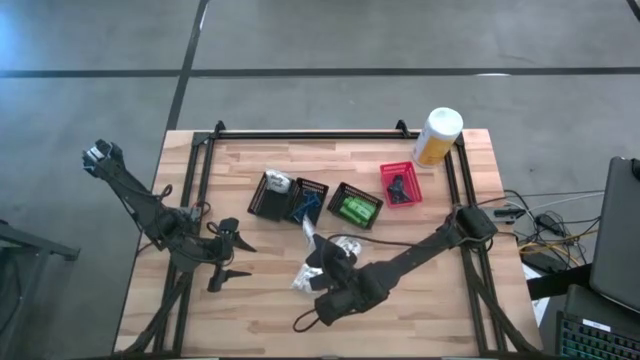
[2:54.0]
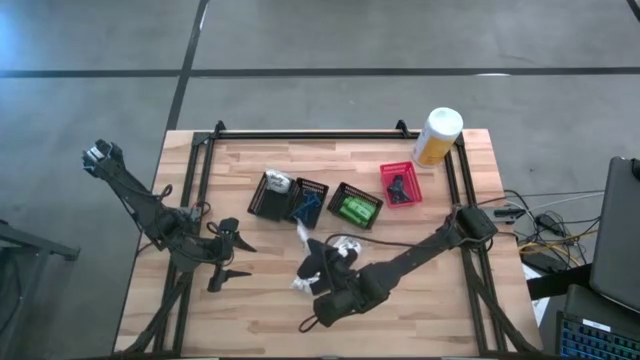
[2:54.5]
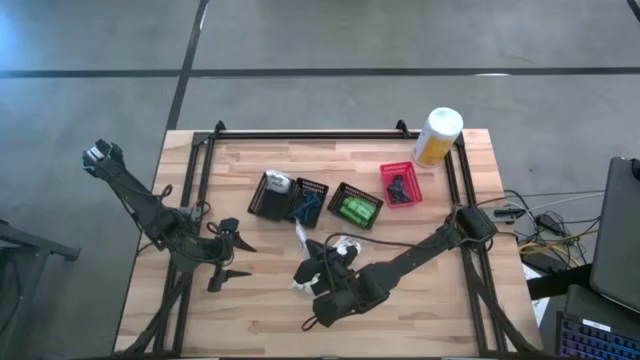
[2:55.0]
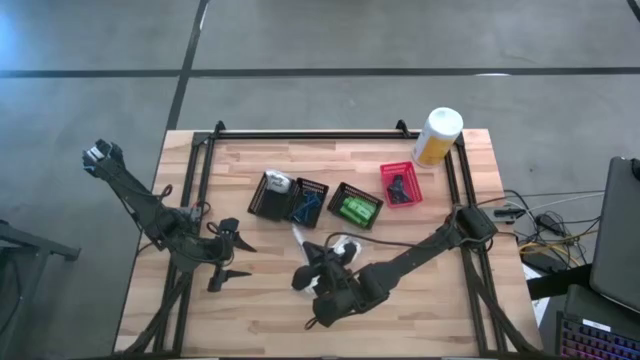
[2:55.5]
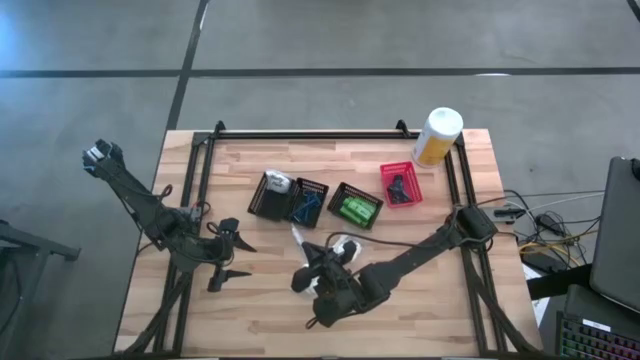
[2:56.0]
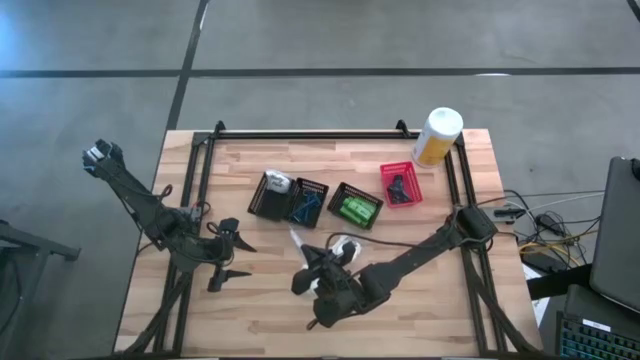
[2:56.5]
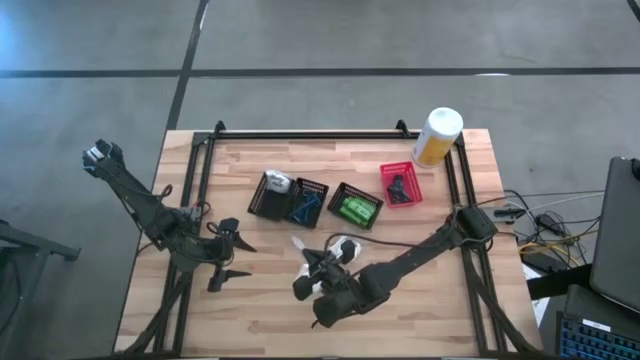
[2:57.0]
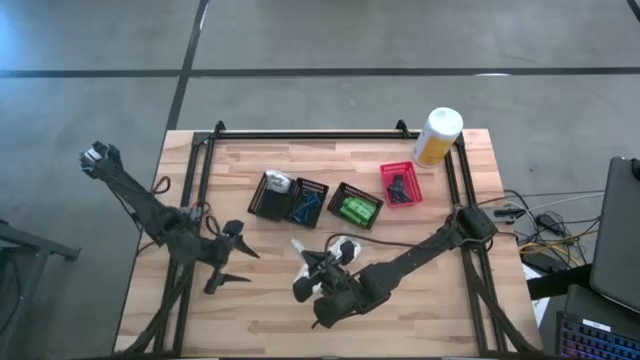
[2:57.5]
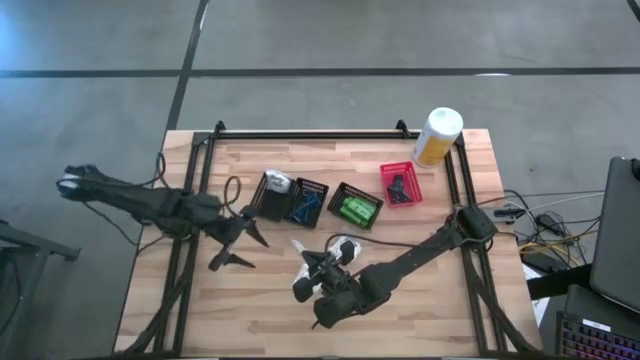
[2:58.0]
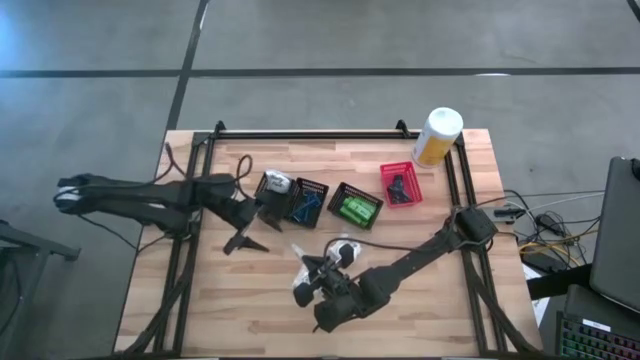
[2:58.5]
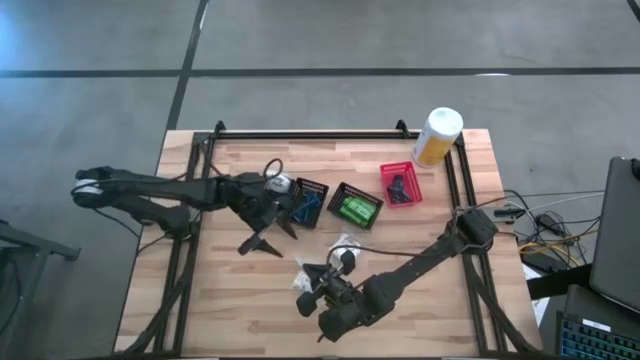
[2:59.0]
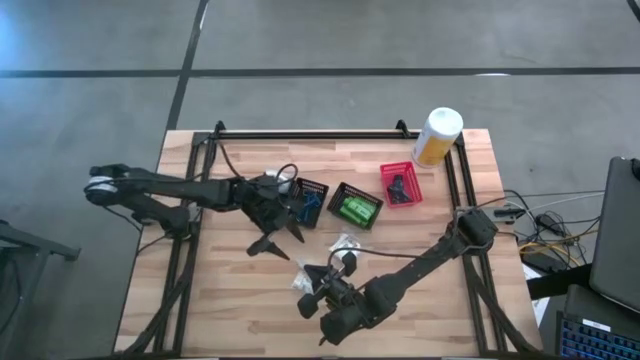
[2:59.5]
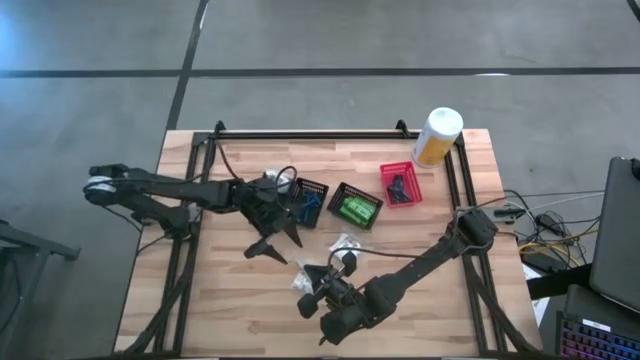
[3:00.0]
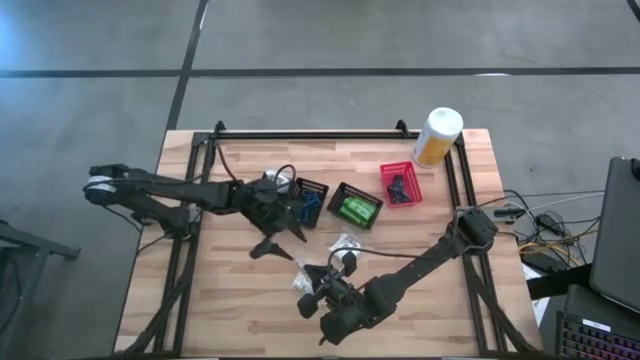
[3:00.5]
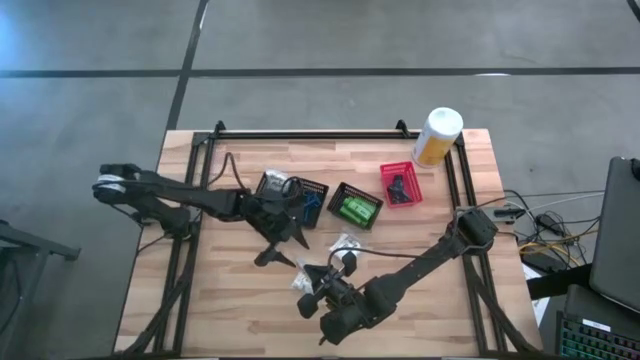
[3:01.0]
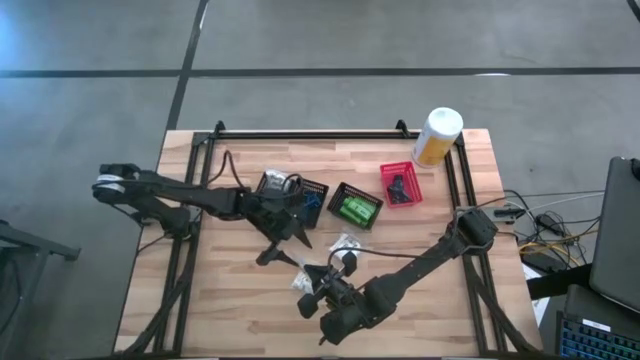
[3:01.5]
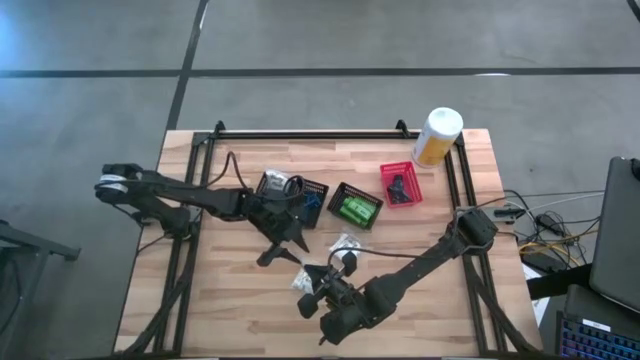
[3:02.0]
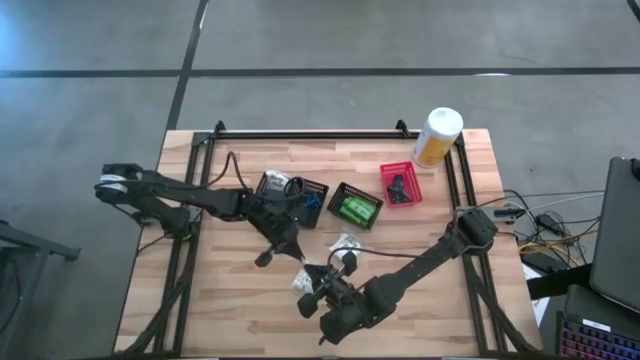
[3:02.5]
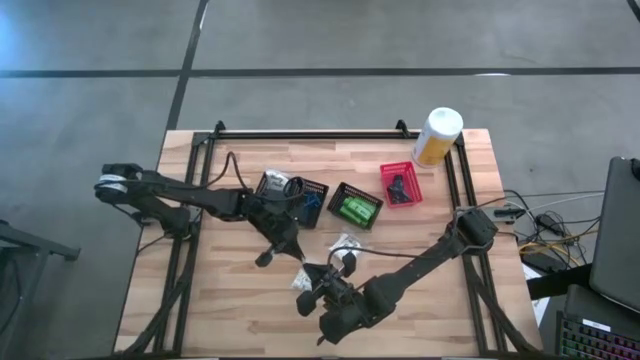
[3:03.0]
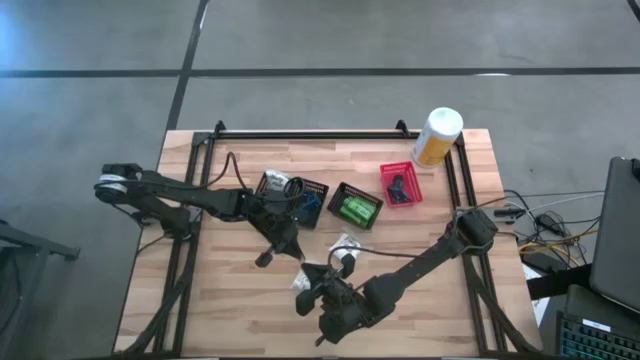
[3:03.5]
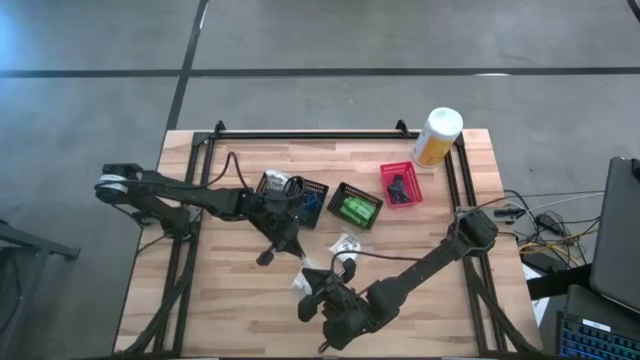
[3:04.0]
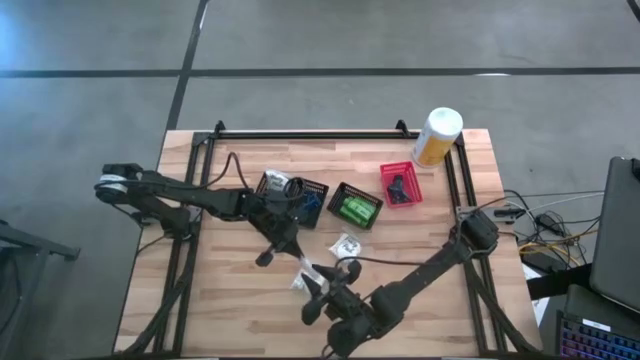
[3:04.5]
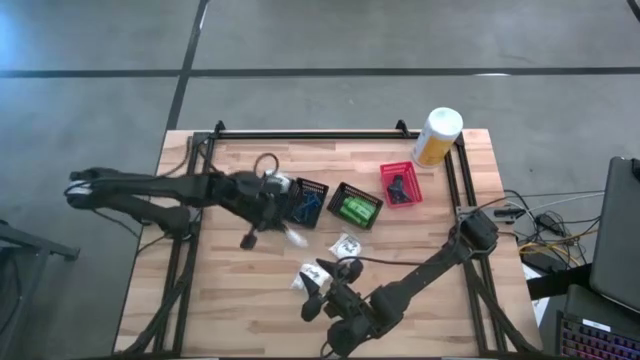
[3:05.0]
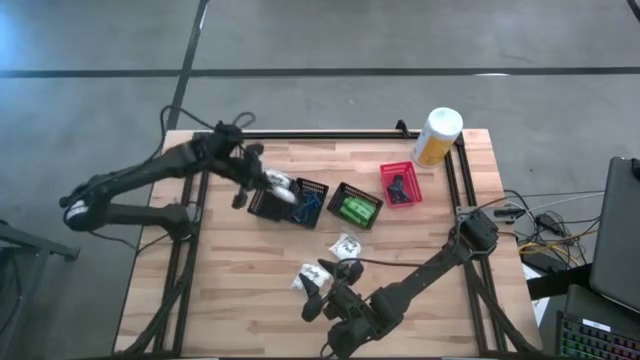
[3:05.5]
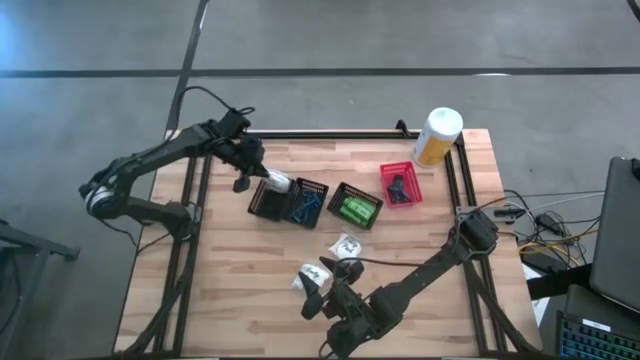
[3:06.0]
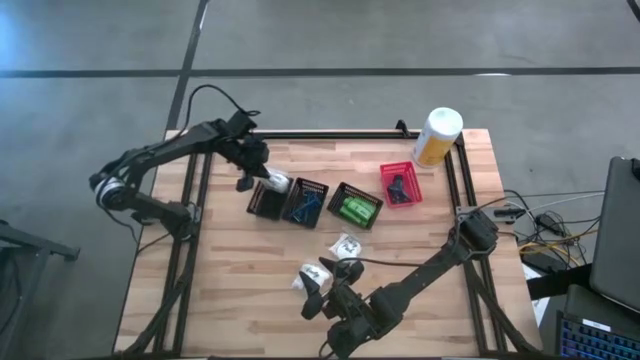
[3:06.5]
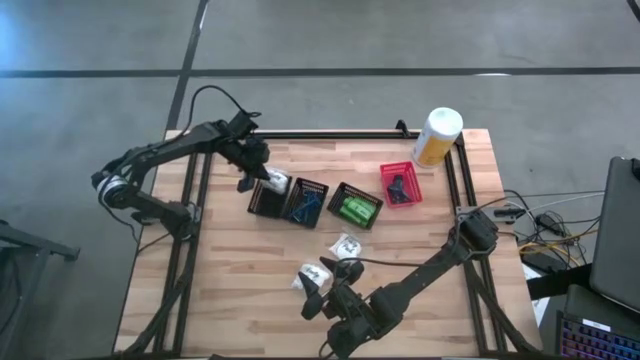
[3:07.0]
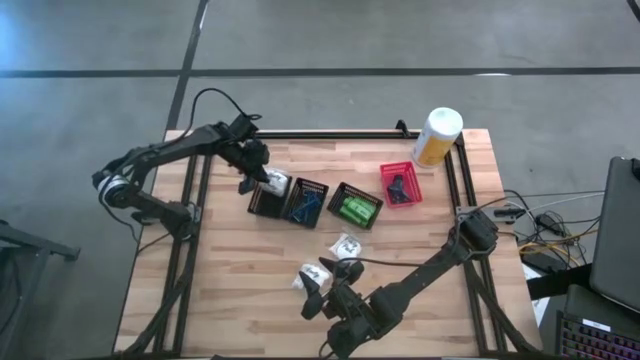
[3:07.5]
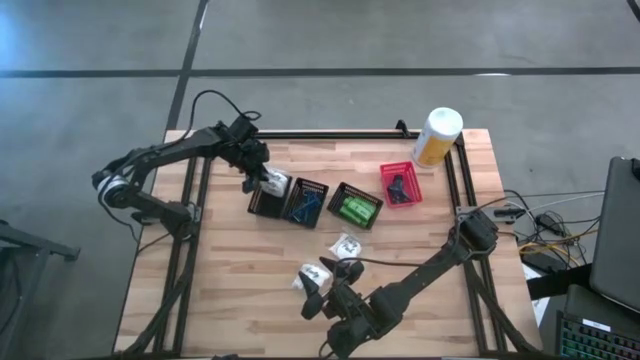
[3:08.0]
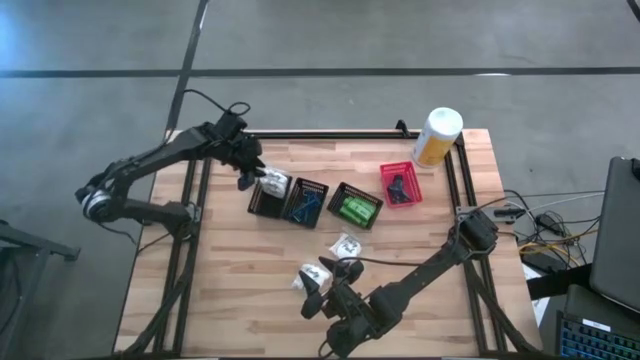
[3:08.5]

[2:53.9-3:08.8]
Task: Pick & Place Travel size toiletries
Put the center vanity pack into the left black bin

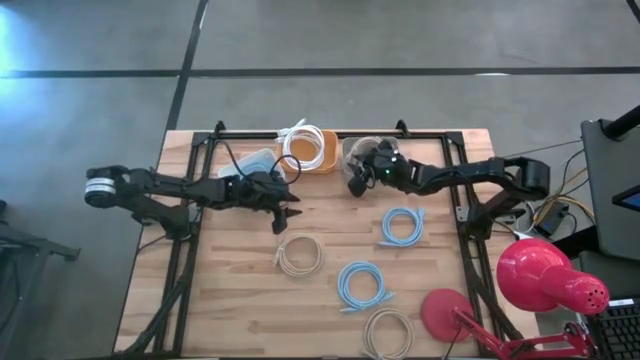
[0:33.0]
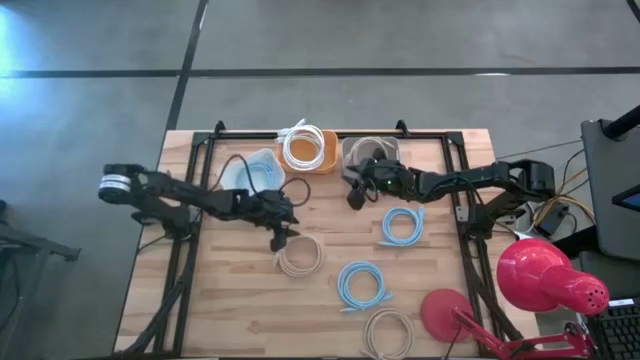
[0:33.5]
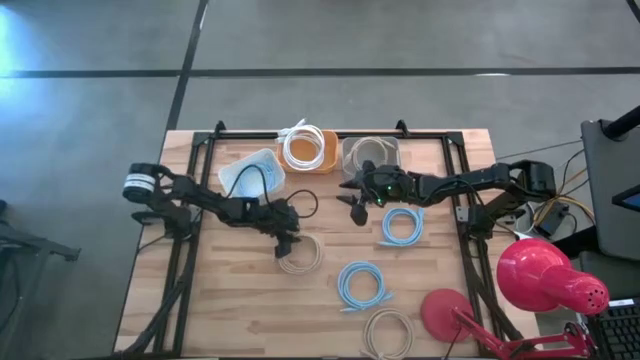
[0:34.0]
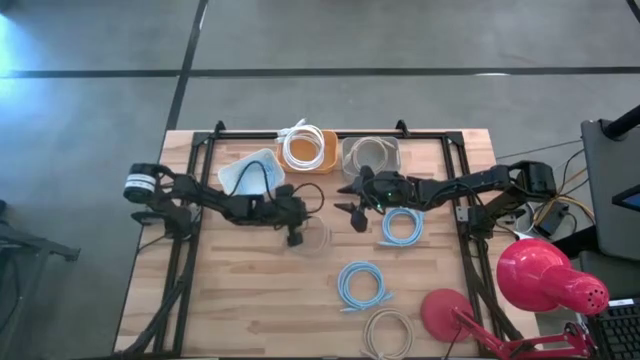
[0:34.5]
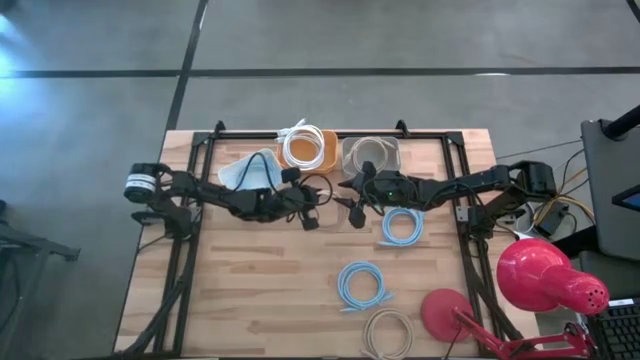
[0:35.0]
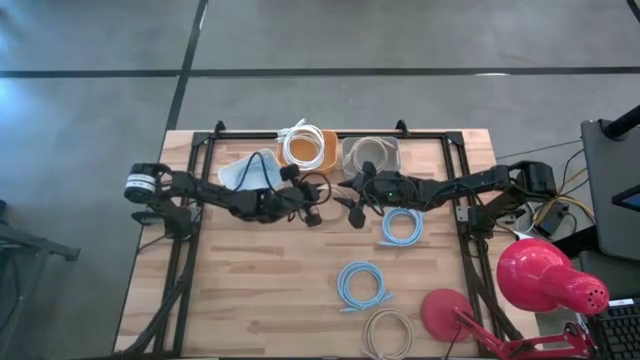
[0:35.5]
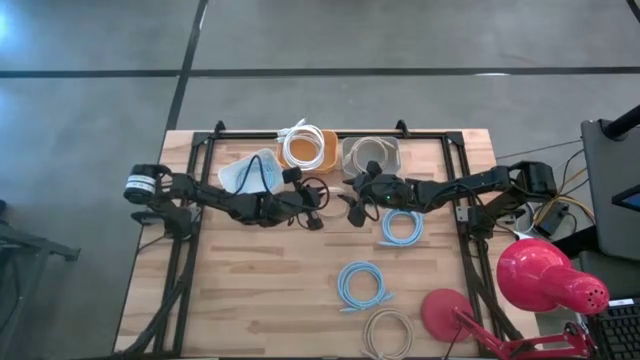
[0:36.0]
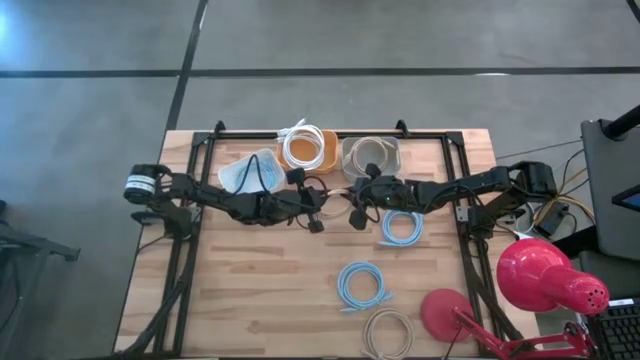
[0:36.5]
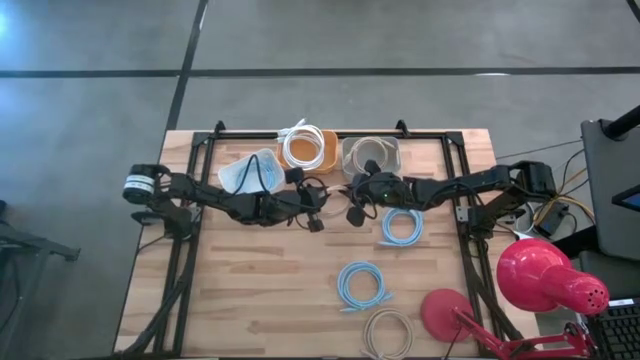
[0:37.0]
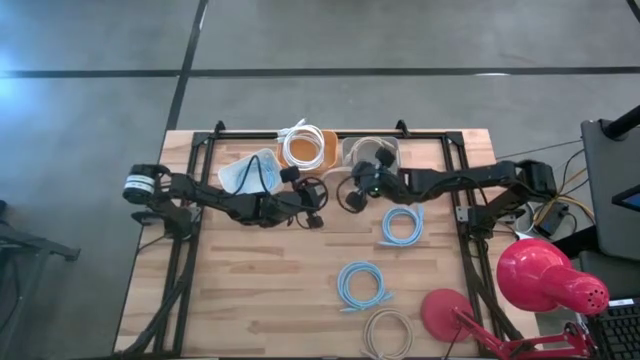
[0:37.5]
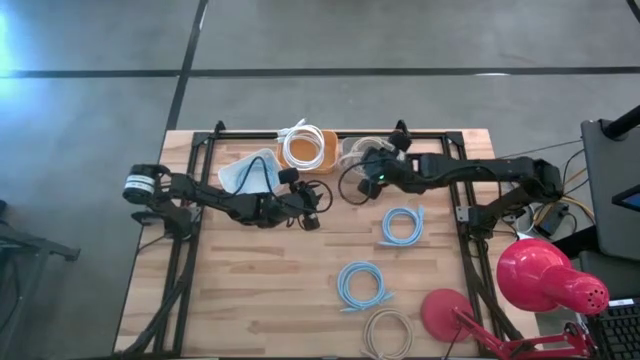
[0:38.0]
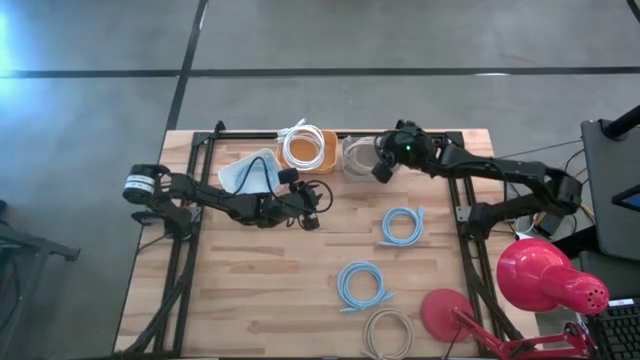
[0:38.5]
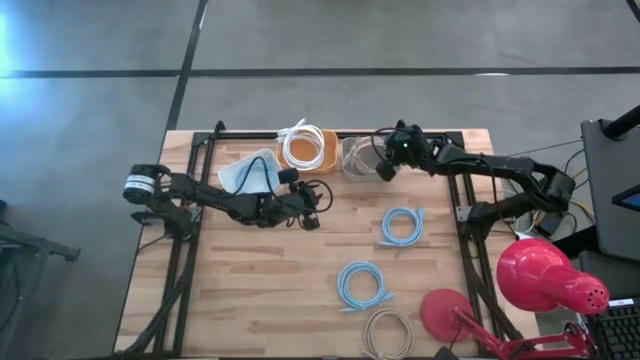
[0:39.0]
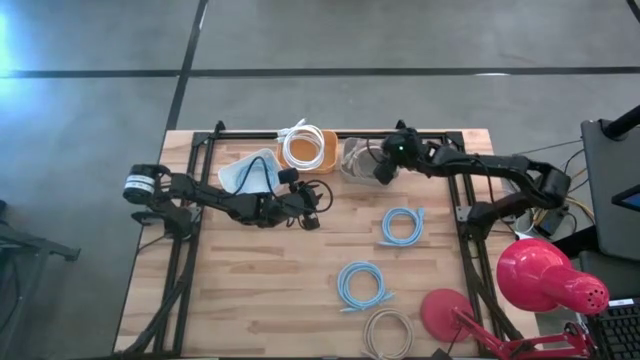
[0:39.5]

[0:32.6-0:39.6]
Task: Sort HDMI cables
Put the left brown HDMI cable into the brown bin
